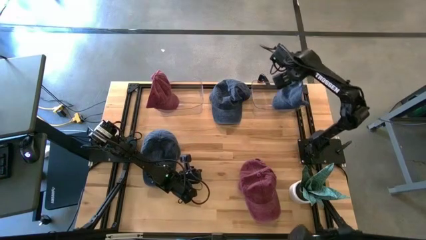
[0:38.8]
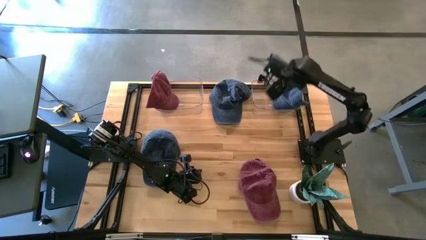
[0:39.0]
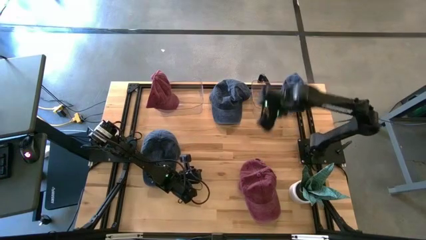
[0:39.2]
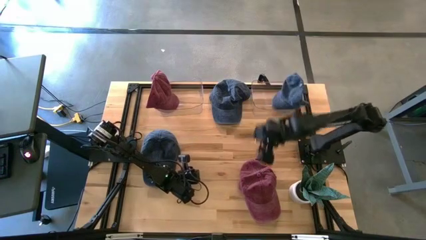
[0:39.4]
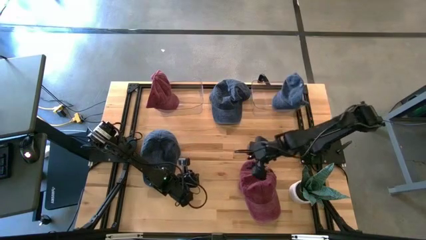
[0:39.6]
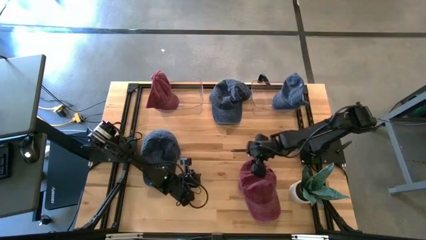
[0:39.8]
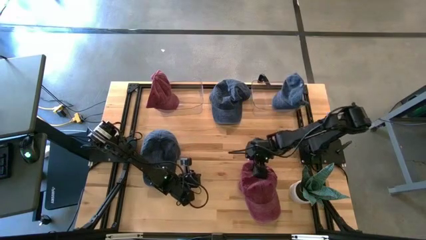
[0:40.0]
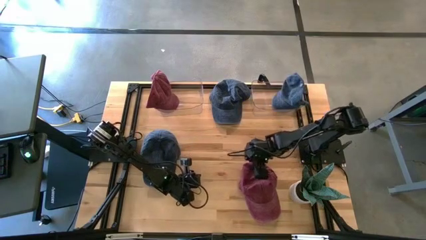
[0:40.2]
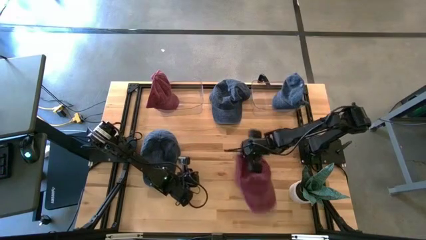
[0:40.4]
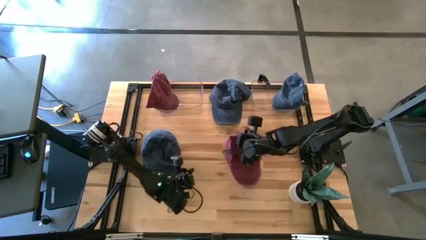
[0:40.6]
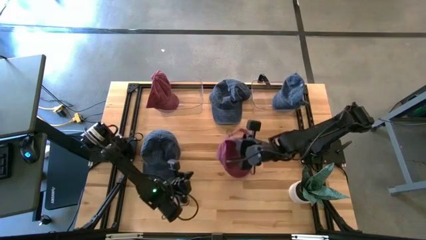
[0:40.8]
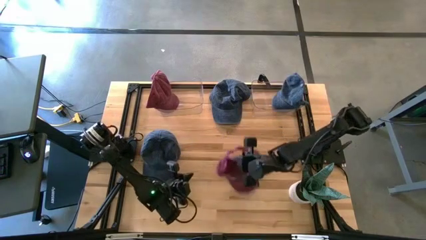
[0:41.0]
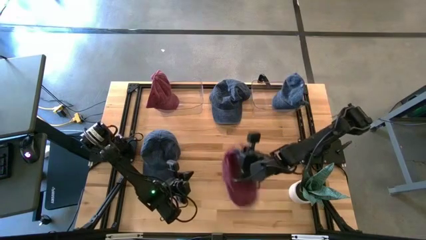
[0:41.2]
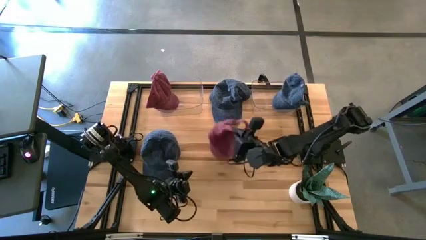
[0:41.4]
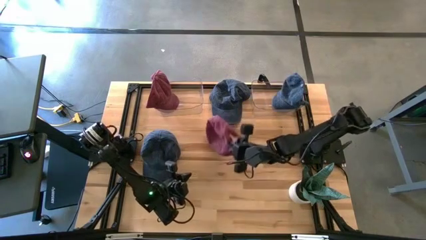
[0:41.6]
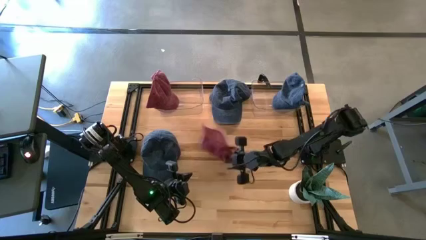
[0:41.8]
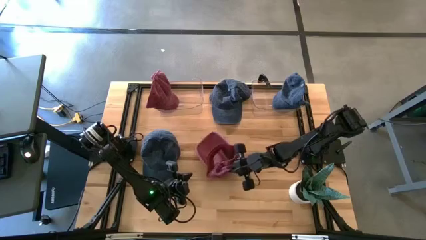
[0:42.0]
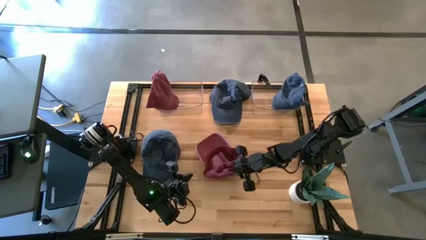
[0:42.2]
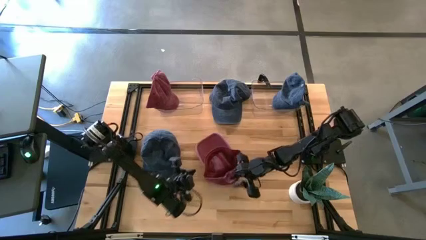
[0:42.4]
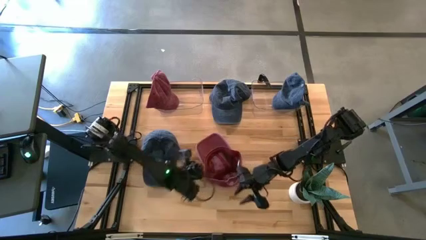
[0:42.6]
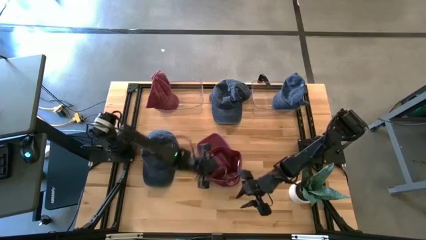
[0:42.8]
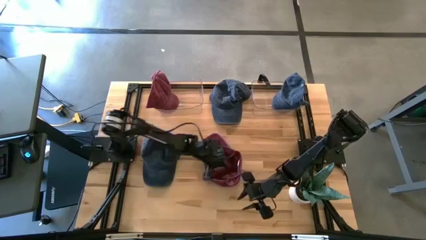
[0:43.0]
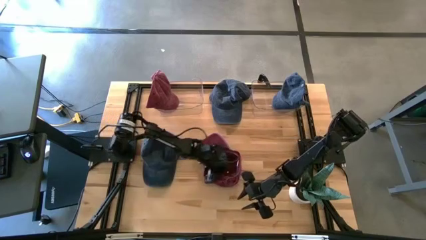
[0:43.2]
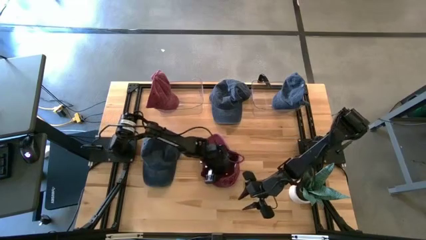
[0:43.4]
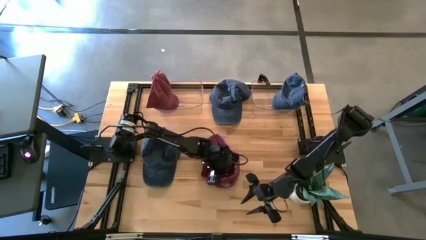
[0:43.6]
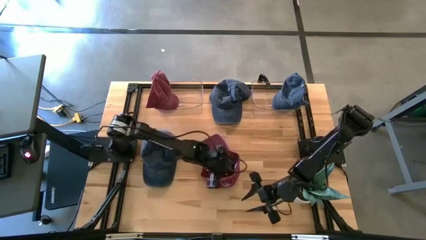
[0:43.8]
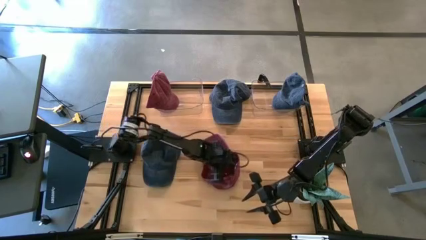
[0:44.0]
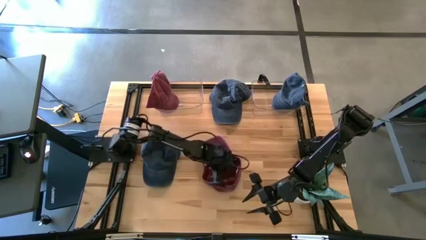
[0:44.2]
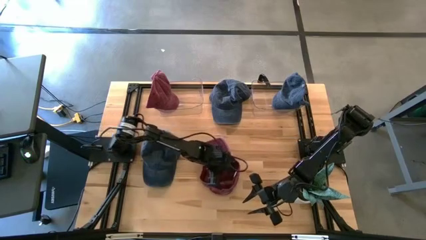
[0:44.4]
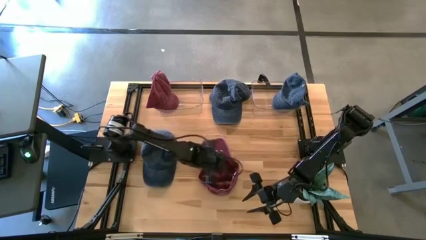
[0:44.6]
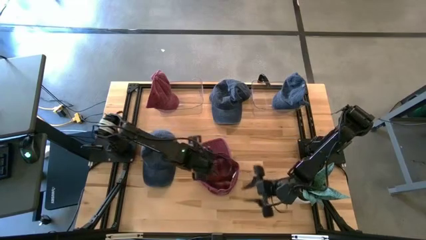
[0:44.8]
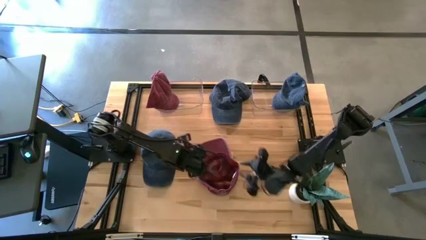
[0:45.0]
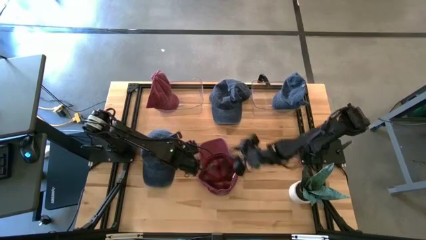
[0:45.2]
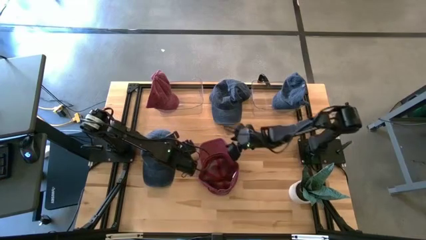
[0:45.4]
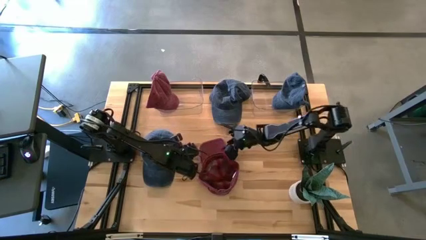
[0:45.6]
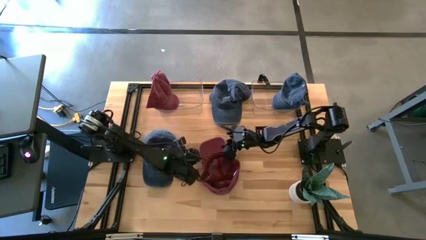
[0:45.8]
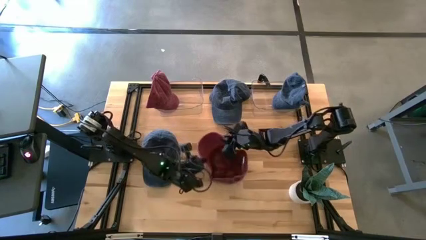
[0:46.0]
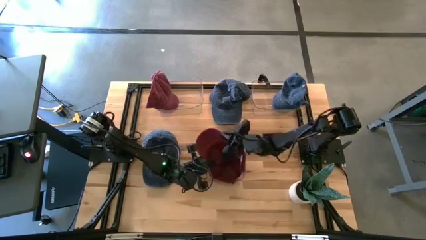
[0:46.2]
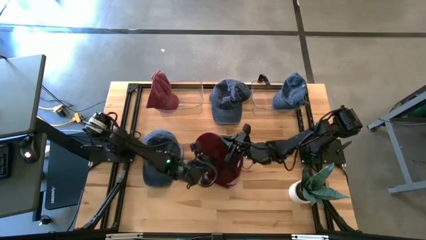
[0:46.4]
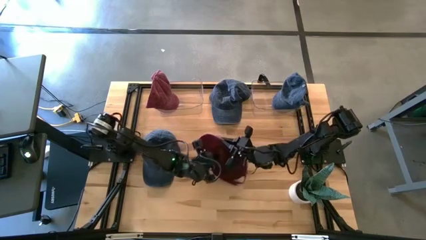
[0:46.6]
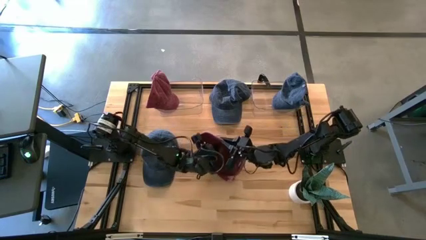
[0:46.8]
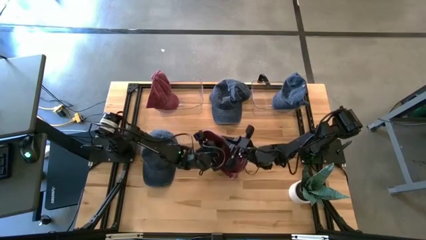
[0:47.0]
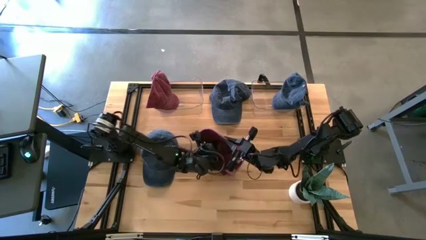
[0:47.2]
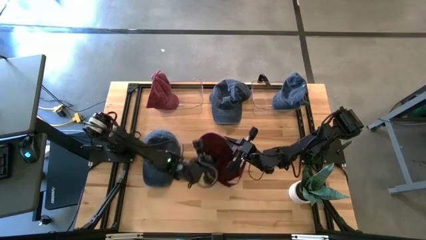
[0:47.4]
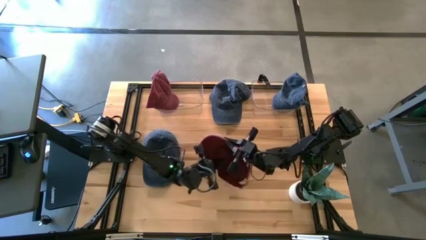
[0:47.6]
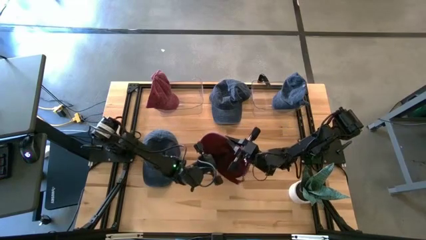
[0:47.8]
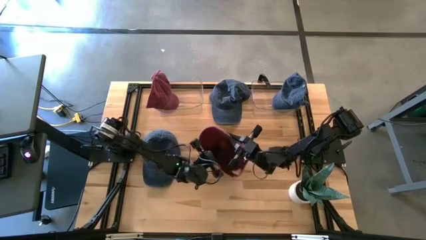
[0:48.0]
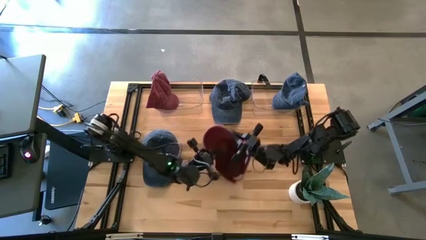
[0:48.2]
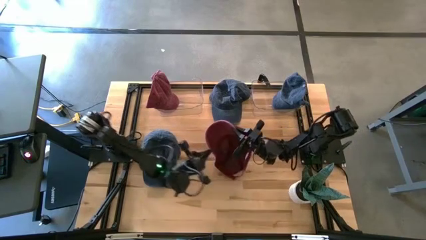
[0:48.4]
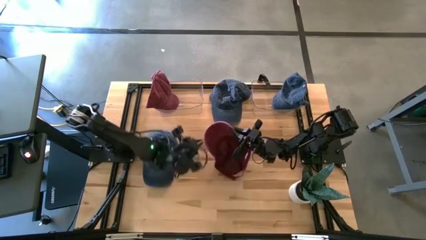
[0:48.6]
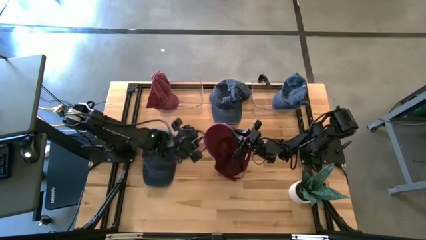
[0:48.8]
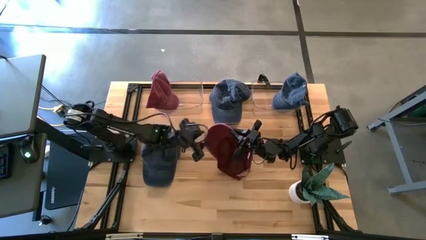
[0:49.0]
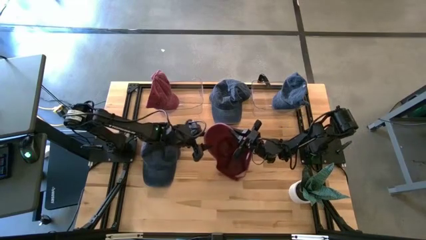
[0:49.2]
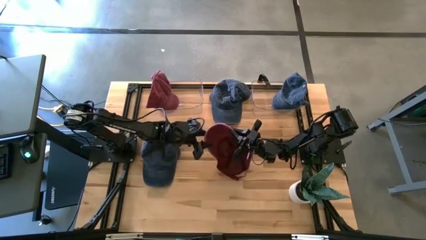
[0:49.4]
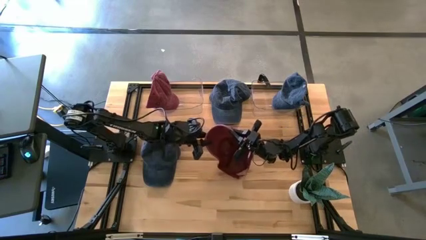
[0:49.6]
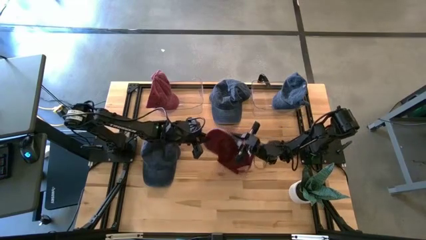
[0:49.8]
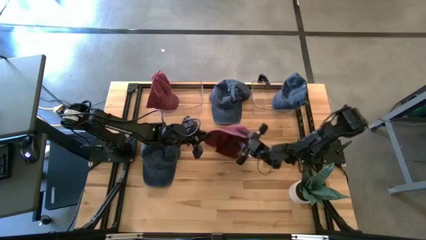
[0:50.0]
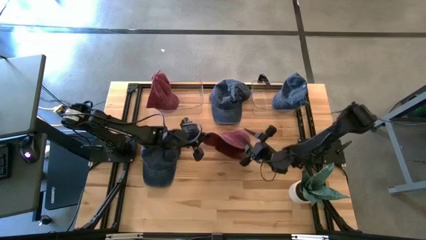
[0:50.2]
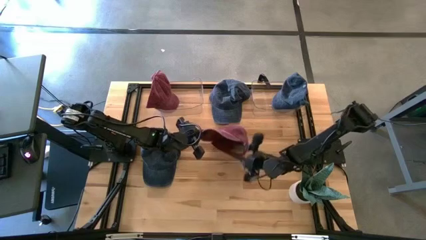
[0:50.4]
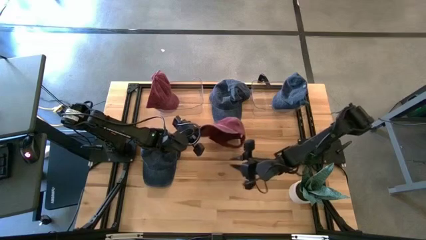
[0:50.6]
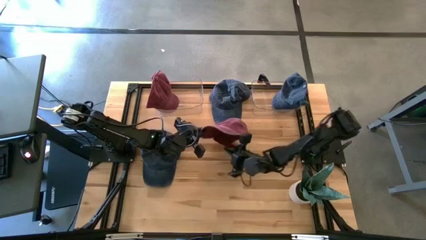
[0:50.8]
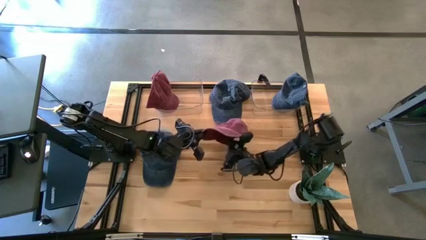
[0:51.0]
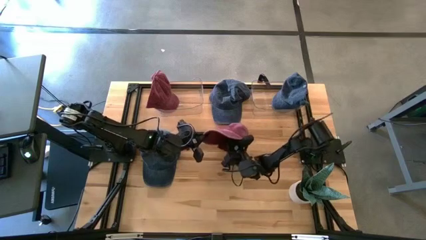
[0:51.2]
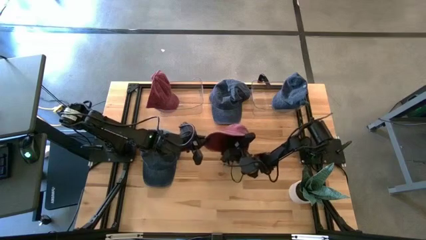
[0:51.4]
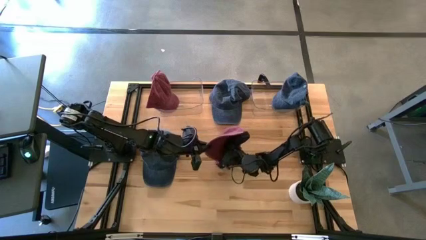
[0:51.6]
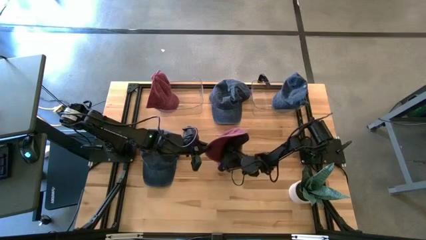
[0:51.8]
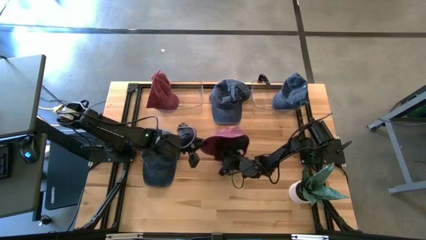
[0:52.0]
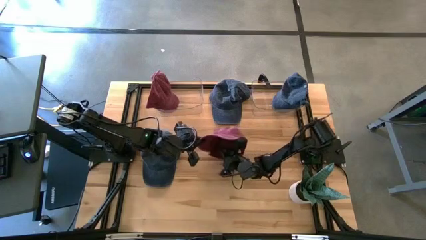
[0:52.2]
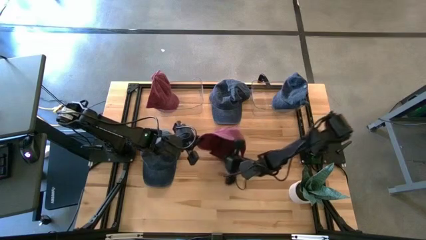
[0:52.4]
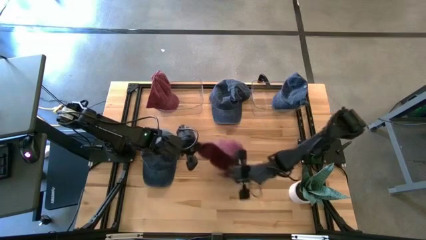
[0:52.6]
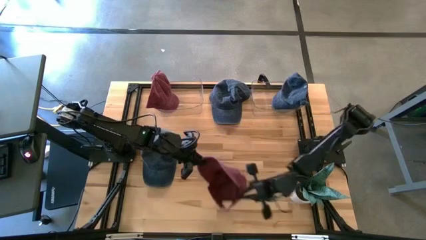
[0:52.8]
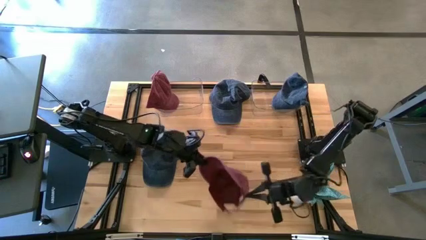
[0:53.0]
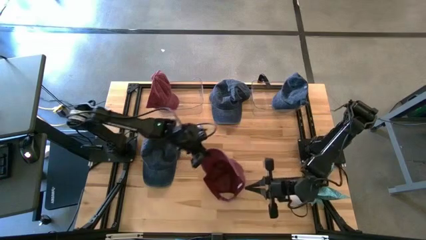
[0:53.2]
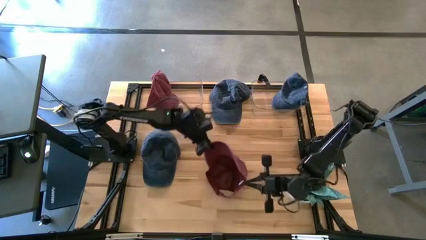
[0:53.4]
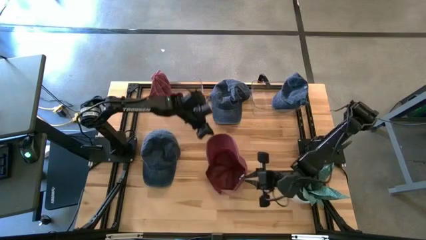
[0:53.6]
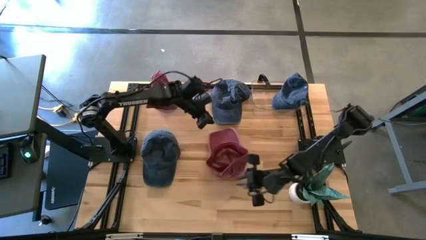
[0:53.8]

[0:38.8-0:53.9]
Task: Pick & Place hat
Put the red cap into the left transparent bin
